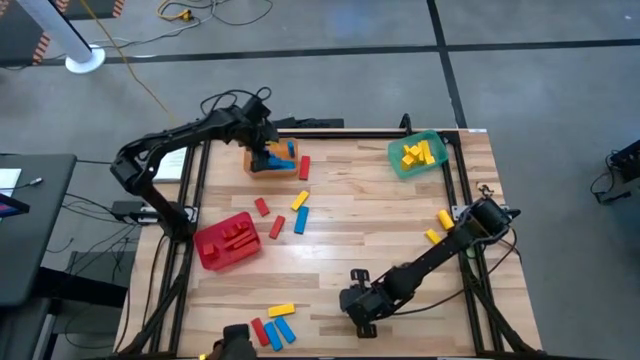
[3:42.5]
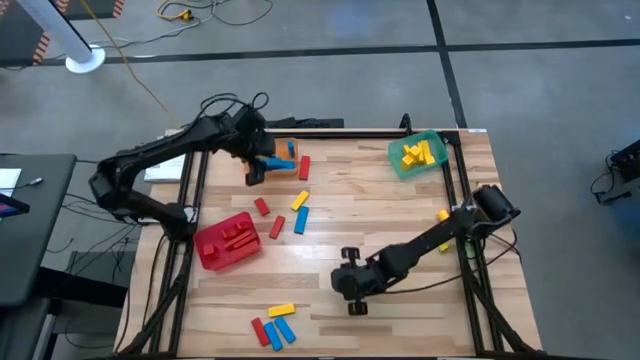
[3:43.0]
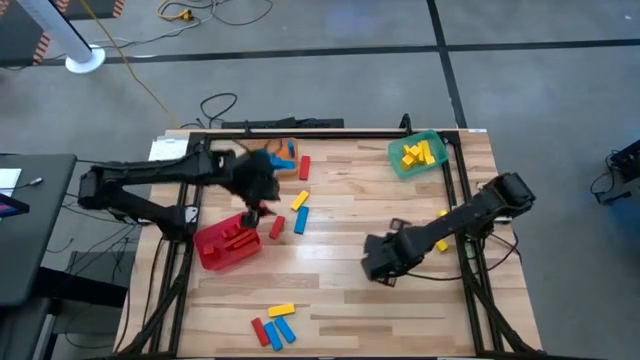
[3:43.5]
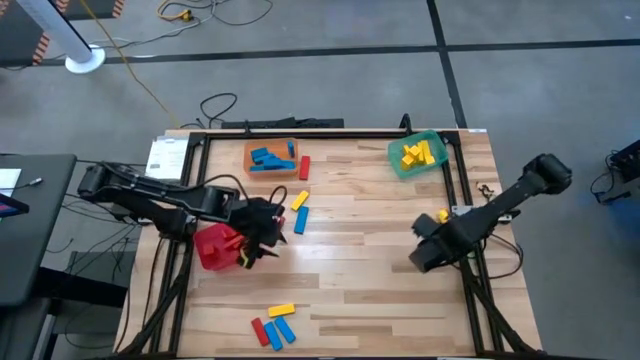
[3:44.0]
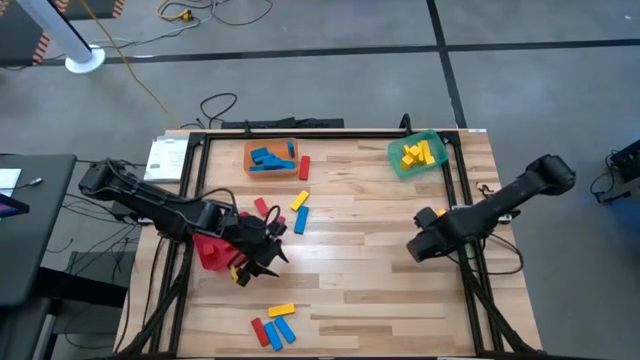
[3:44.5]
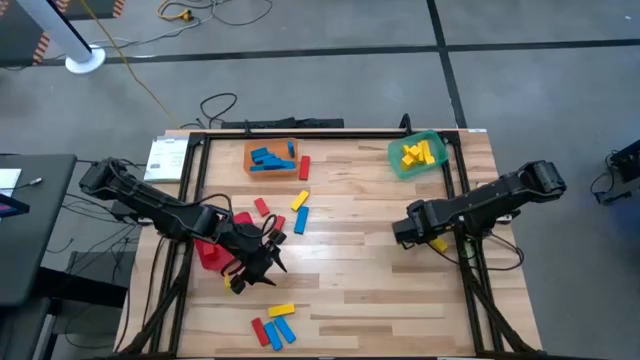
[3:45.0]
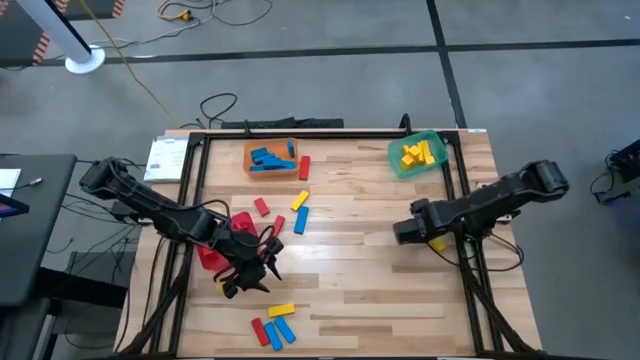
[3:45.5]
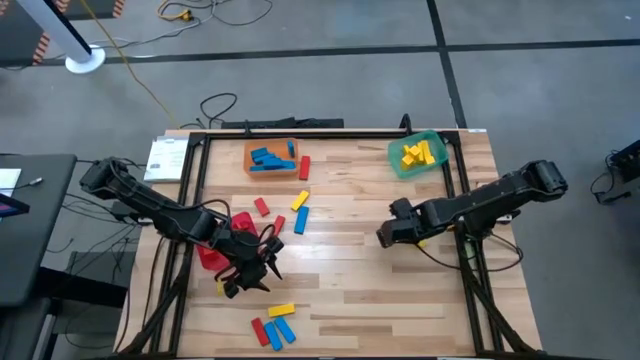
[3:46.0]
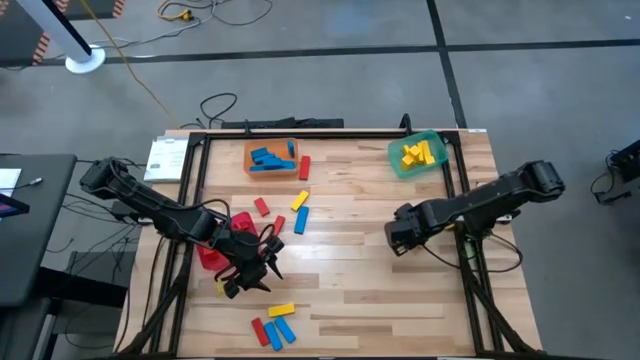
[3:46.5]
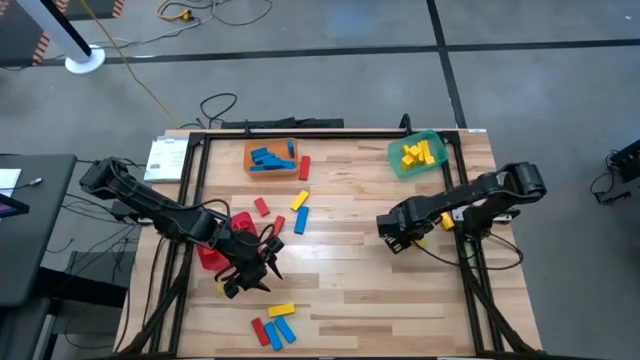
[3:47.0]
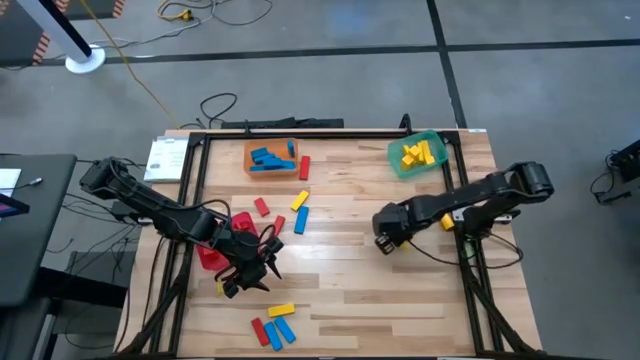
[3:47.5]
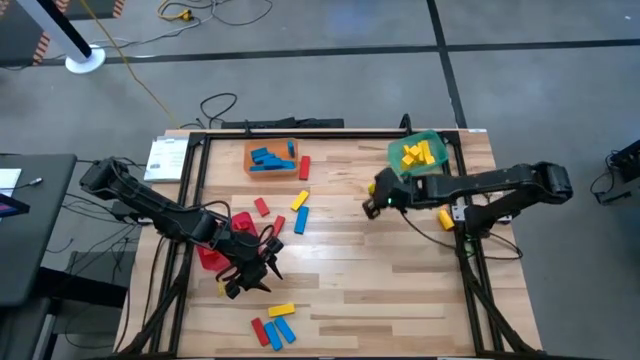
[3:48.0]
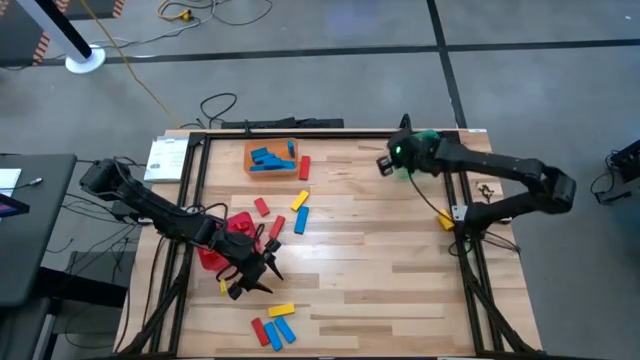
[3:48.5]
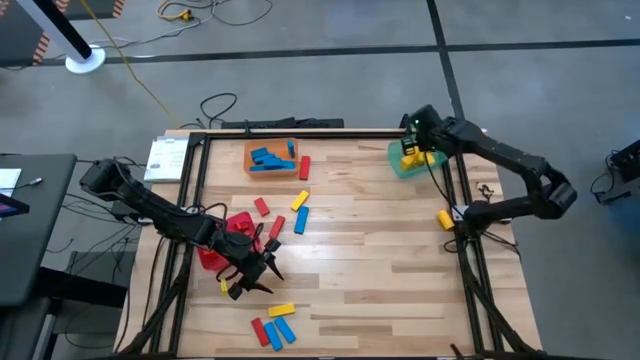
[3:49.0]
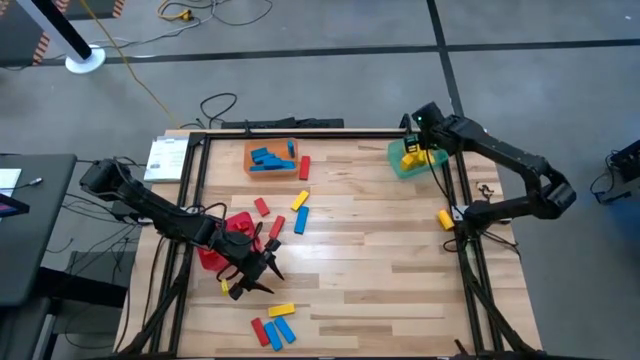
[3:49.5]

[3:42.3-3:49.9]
Task: Sort blocks
Put the yellow block into the green bin

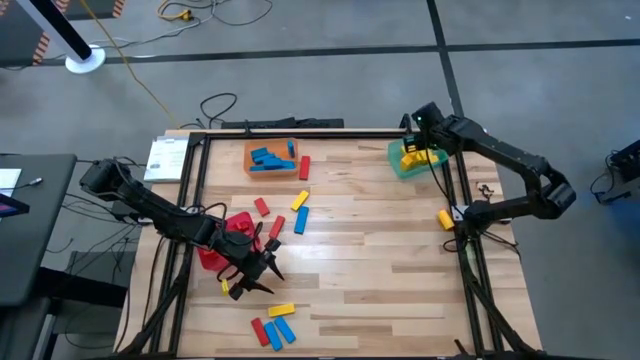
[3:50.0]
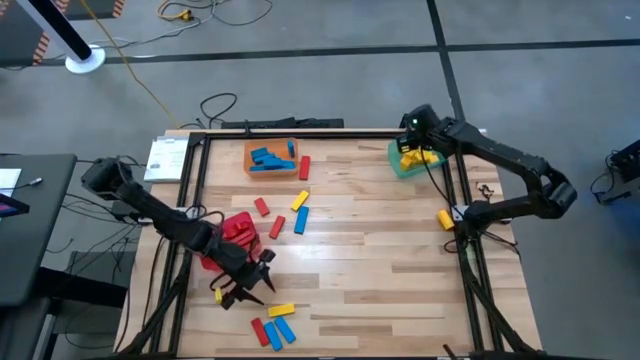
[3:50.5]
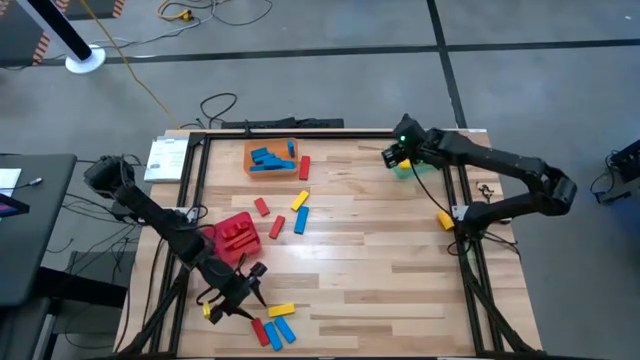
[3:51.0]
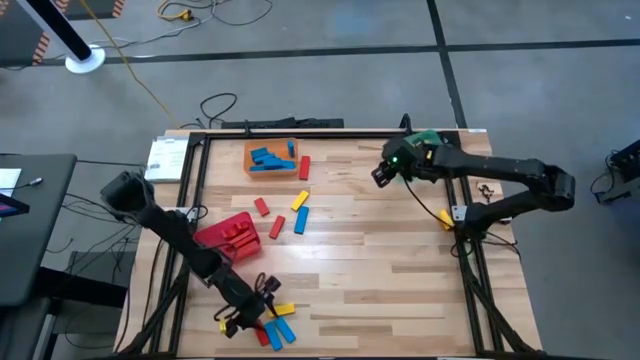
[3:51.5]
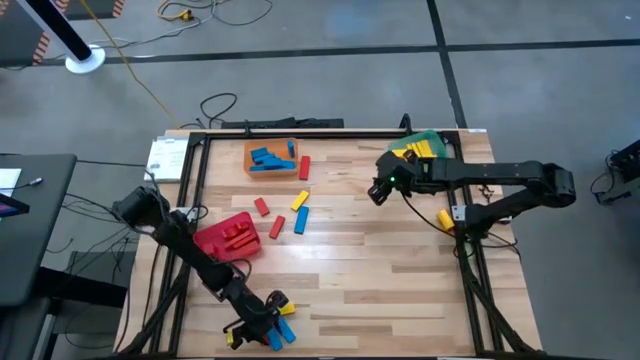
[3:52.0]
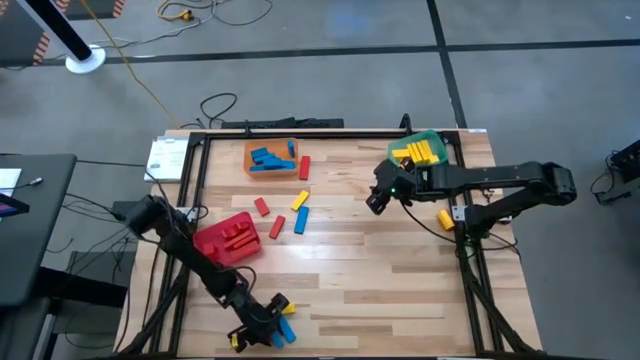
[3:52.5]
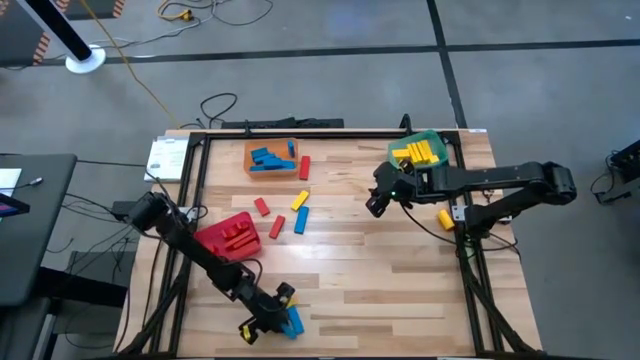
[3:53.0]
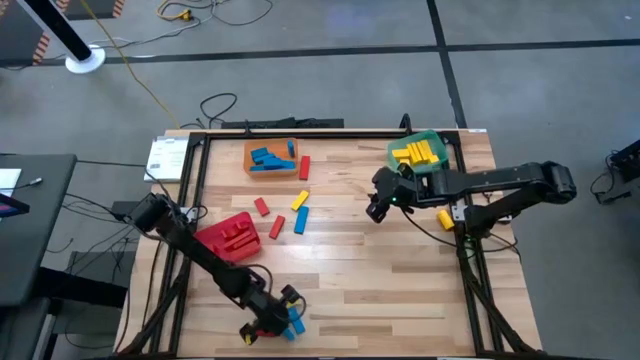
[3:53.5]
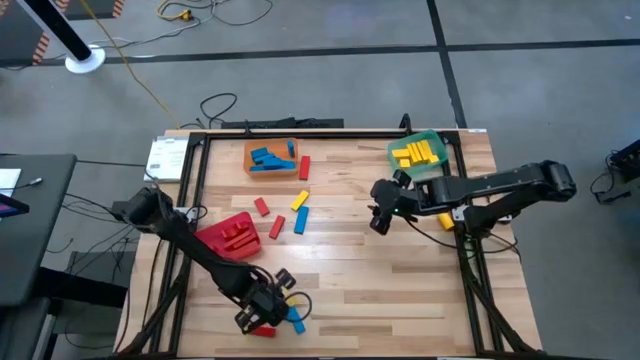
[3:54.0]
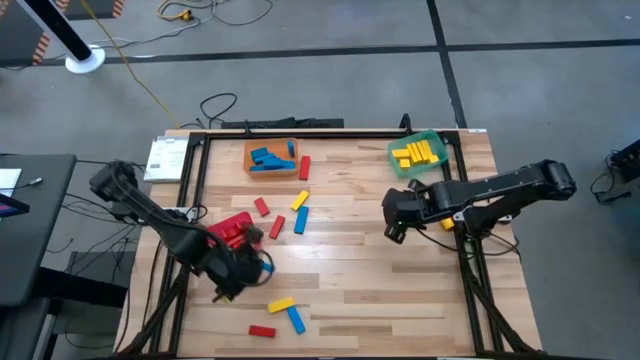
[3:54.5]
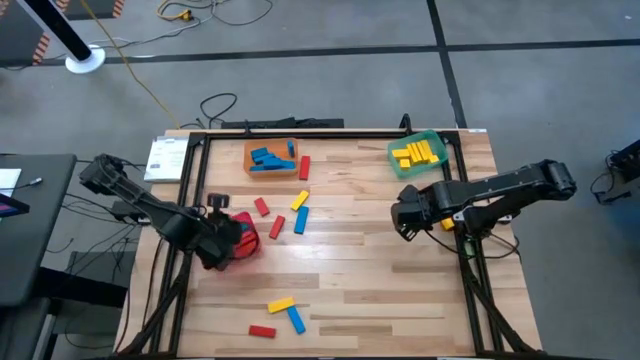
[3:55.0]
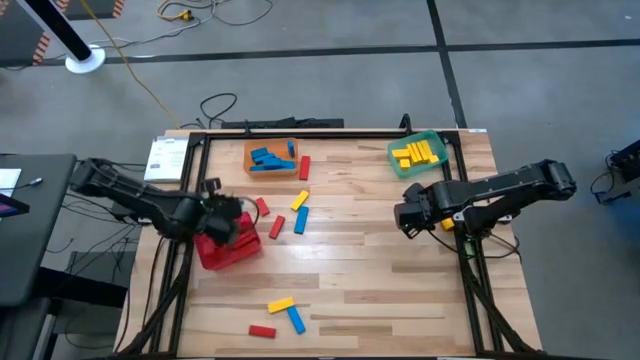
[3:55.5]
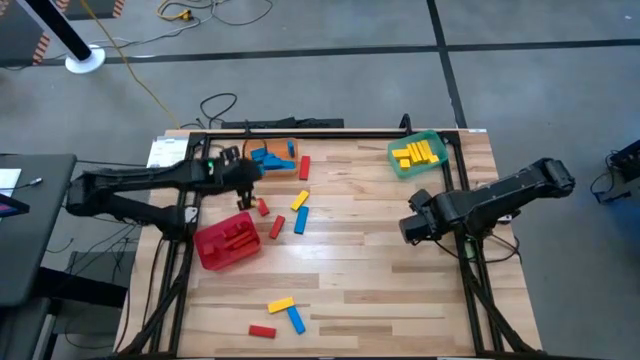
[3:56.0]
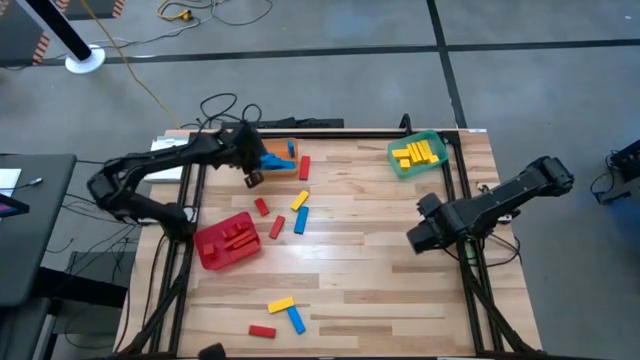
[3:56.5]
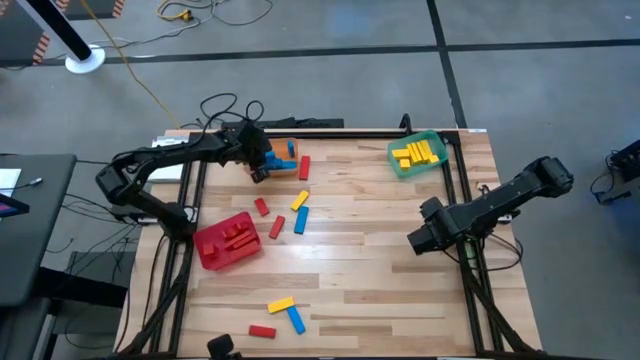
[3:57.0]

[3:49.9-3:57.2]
Put the blue block into the orange bin

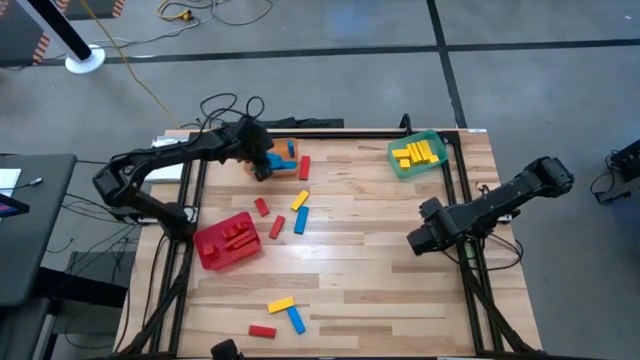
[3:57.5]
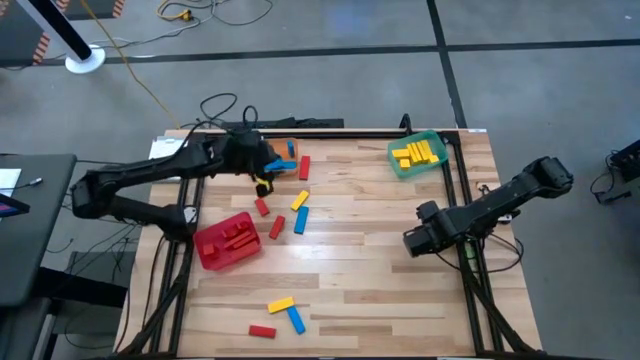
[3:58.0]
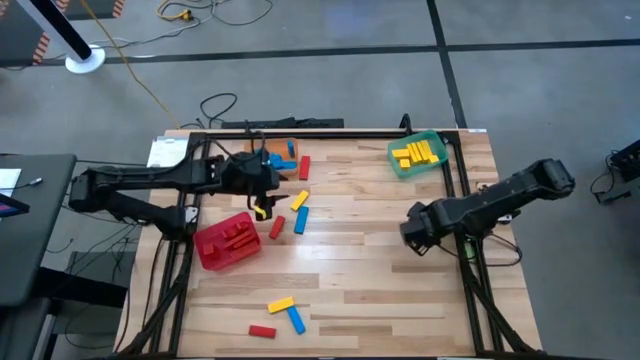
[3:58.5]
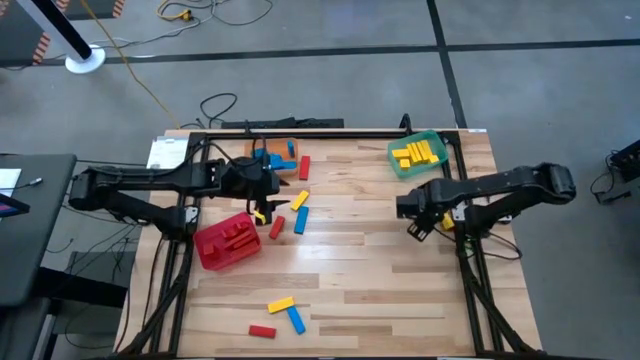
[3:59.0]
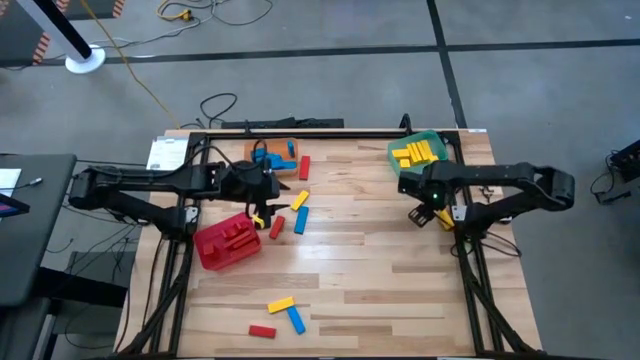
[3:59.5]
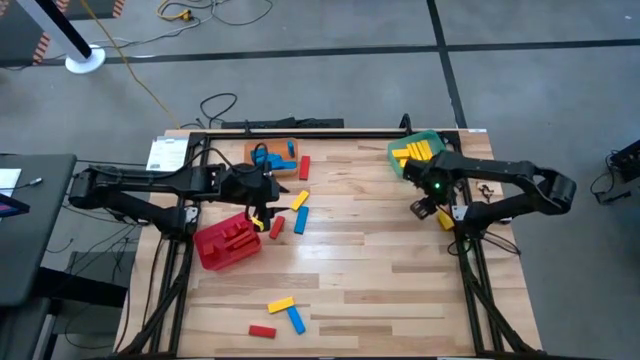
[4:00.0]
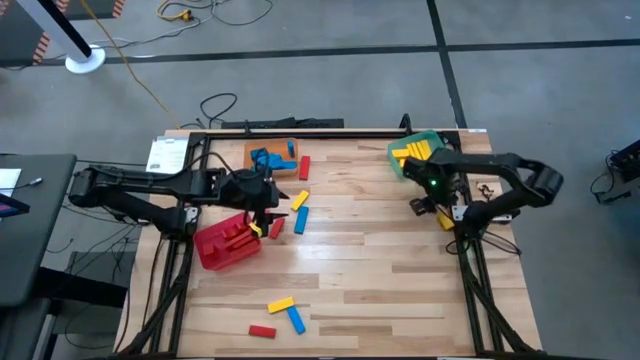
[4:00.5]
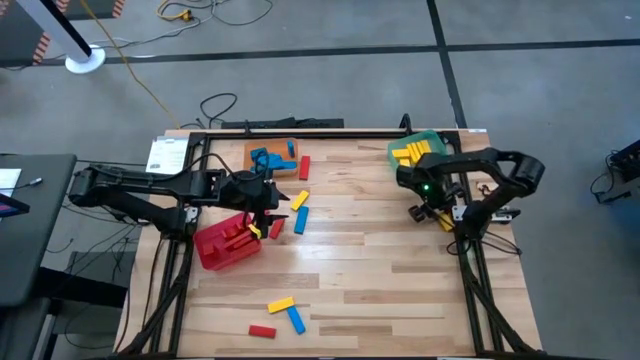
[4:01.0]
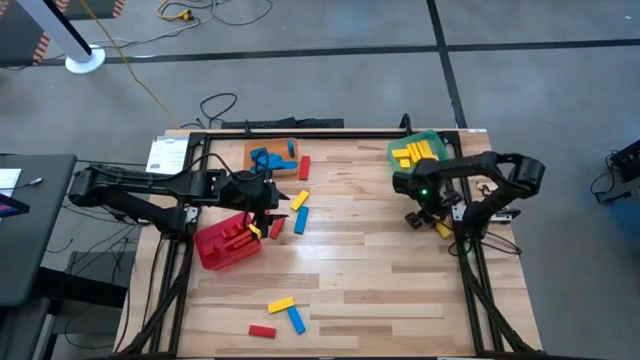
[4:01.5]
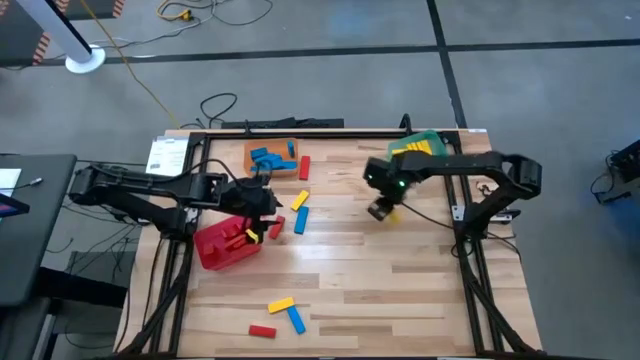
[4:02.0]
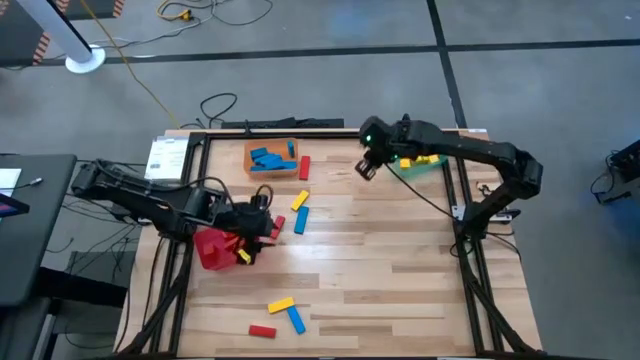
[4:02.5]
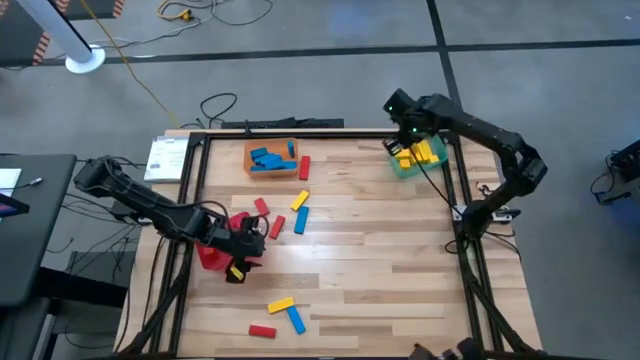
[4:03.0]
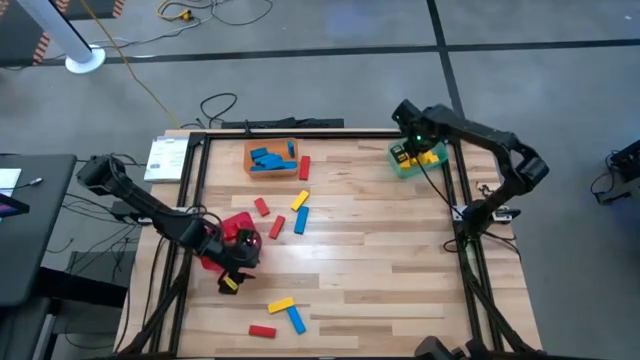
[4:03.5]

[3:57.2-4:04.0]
Put the yellow block into the green bin
